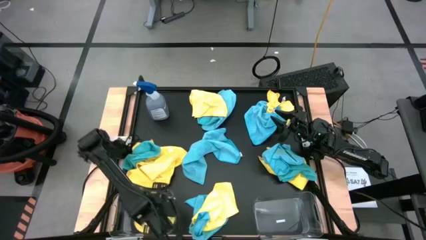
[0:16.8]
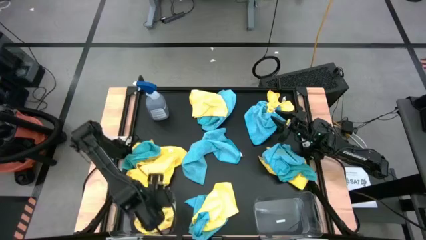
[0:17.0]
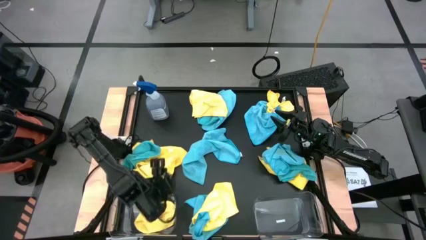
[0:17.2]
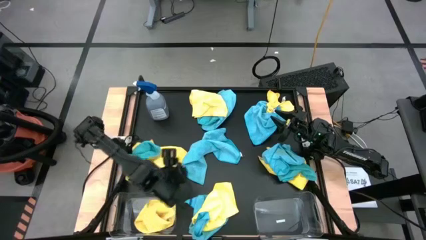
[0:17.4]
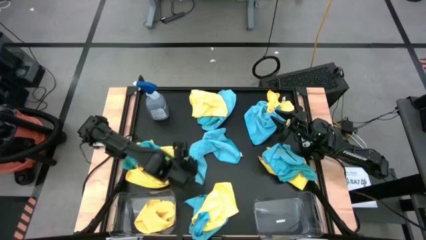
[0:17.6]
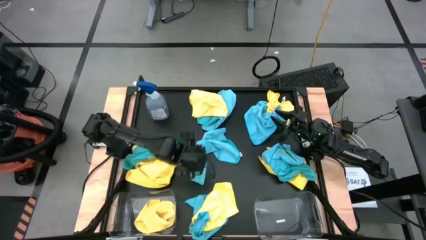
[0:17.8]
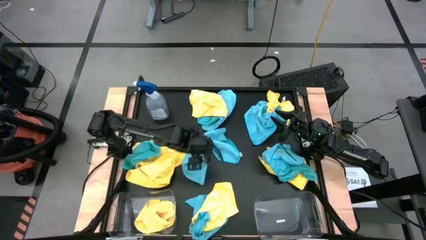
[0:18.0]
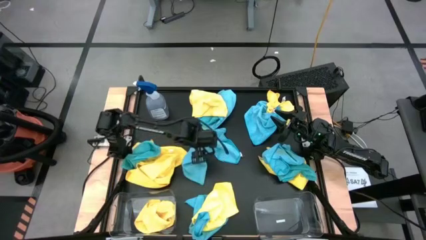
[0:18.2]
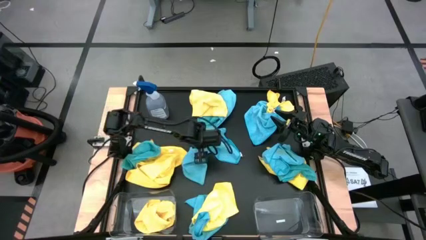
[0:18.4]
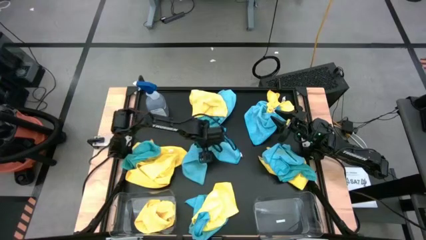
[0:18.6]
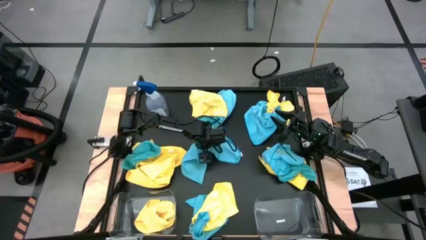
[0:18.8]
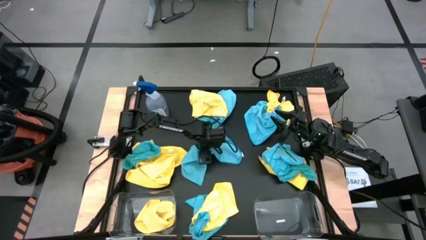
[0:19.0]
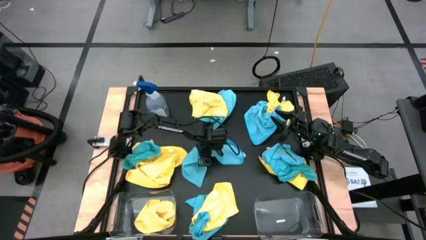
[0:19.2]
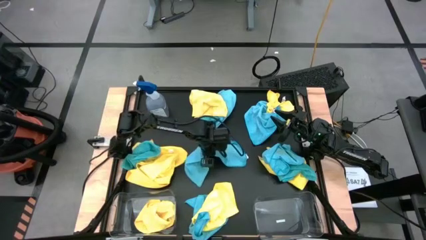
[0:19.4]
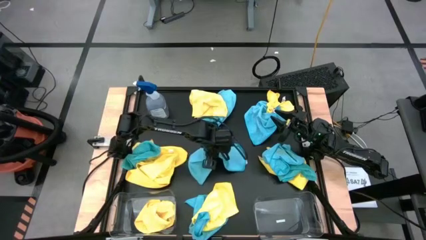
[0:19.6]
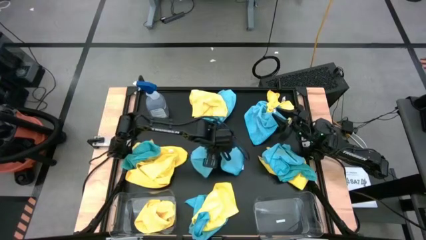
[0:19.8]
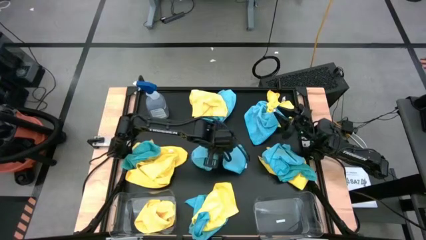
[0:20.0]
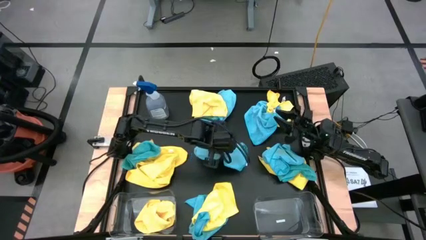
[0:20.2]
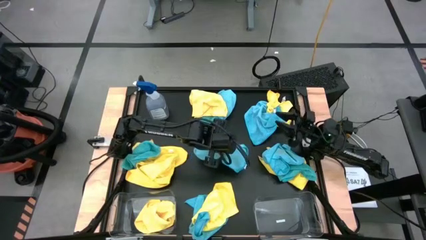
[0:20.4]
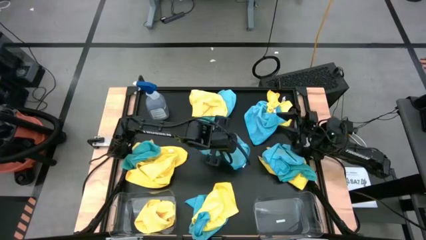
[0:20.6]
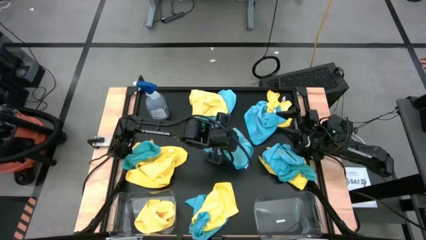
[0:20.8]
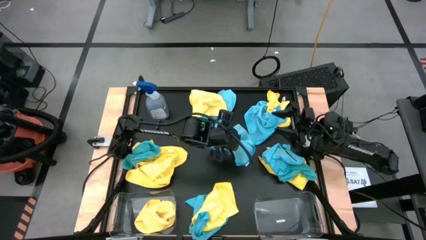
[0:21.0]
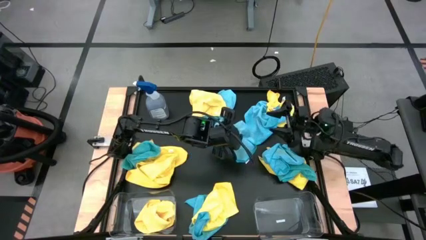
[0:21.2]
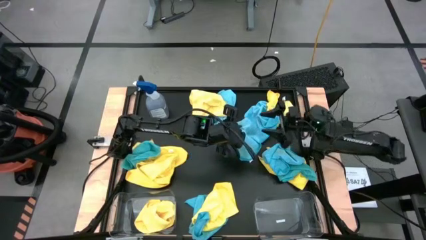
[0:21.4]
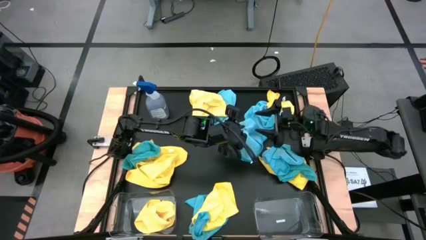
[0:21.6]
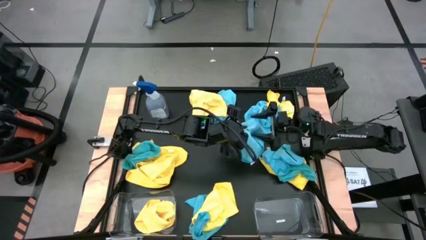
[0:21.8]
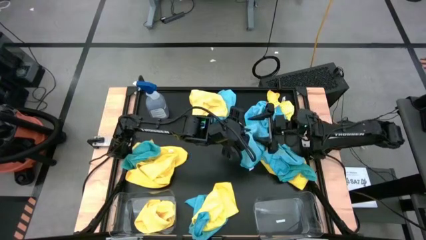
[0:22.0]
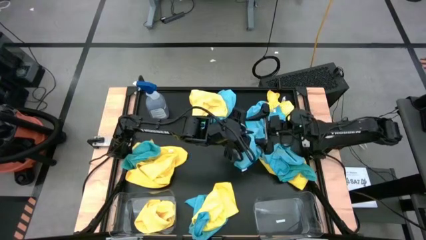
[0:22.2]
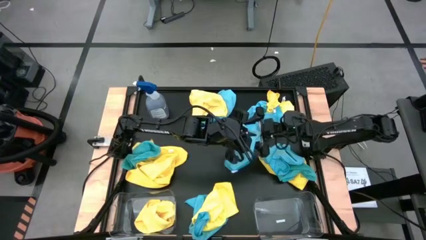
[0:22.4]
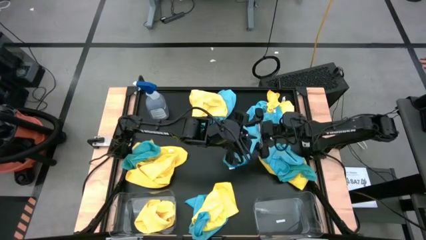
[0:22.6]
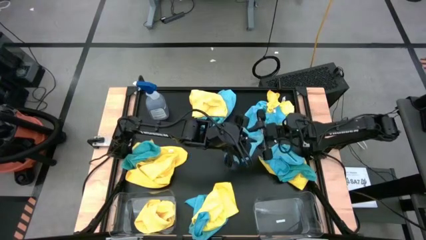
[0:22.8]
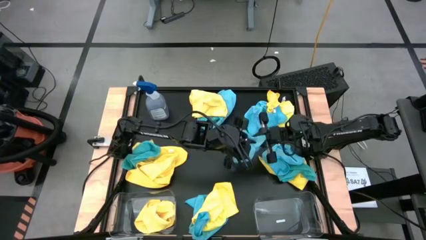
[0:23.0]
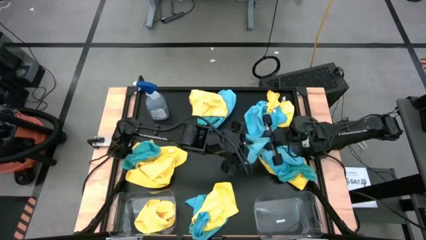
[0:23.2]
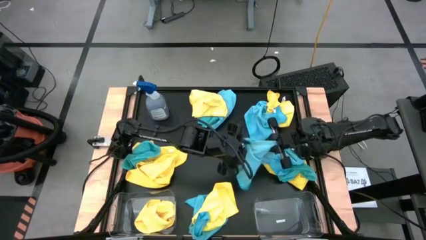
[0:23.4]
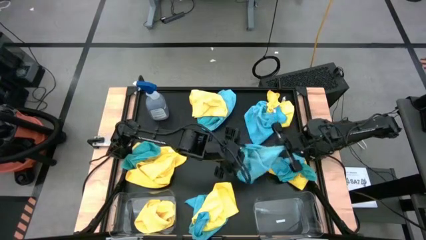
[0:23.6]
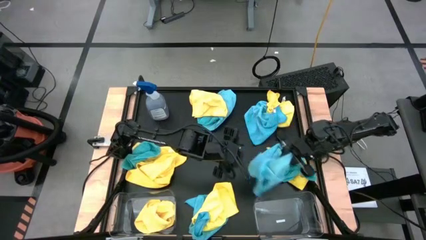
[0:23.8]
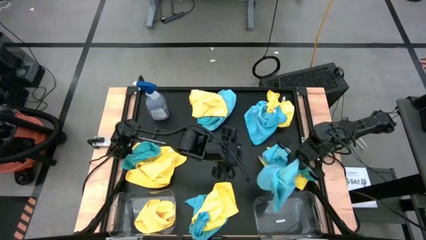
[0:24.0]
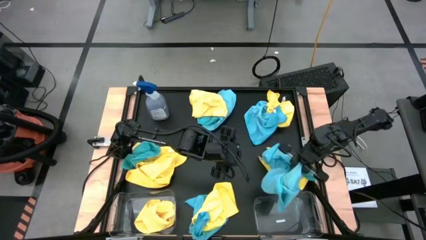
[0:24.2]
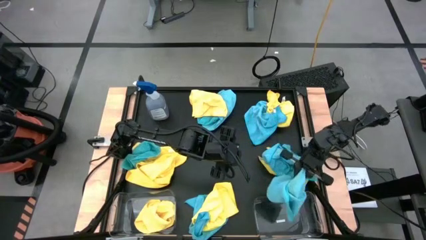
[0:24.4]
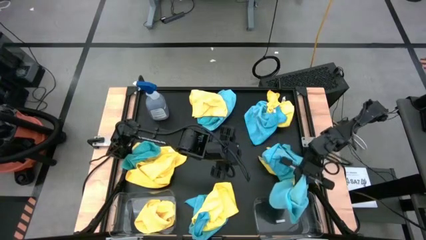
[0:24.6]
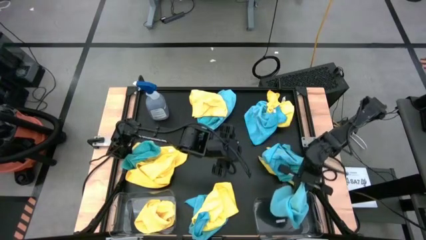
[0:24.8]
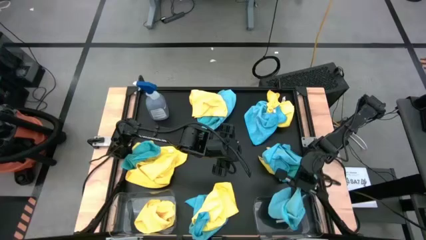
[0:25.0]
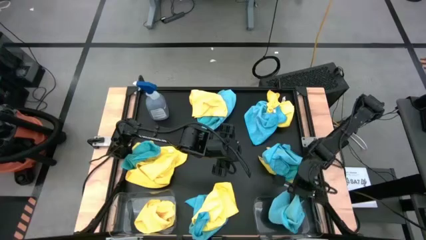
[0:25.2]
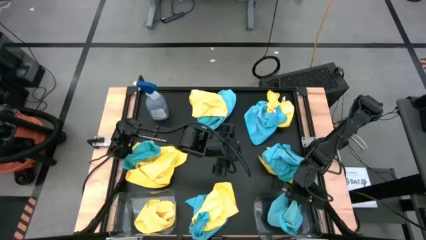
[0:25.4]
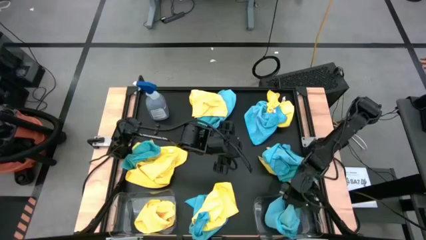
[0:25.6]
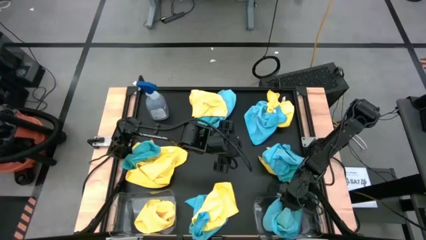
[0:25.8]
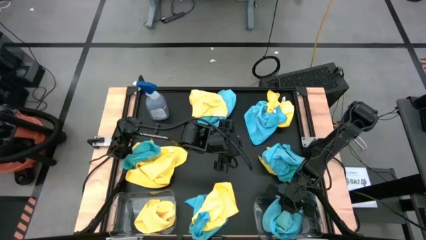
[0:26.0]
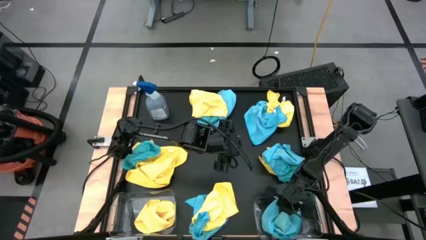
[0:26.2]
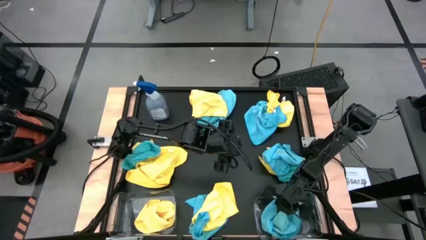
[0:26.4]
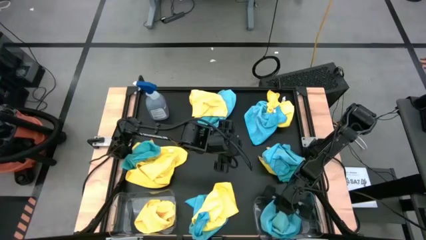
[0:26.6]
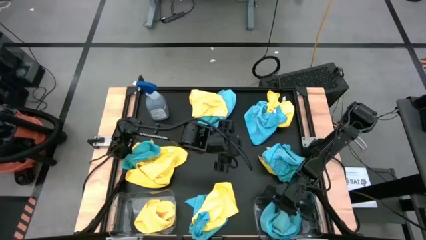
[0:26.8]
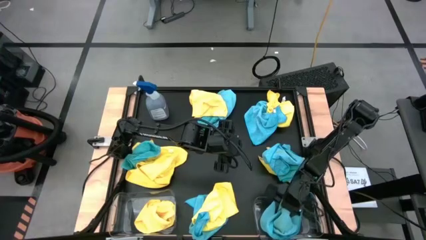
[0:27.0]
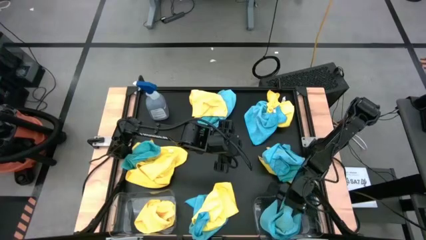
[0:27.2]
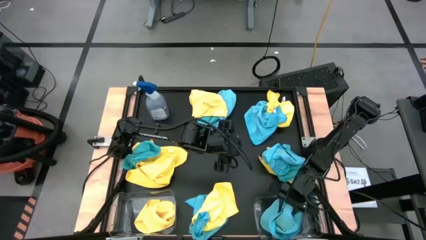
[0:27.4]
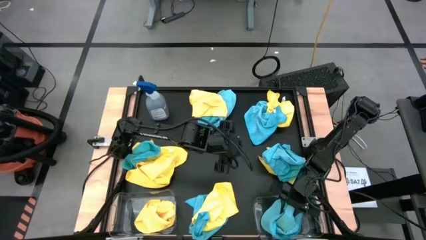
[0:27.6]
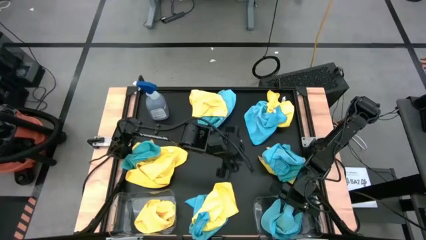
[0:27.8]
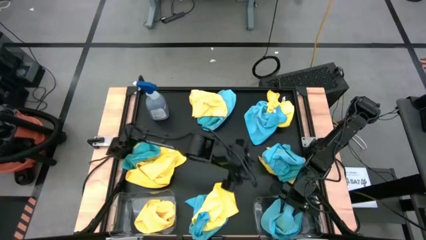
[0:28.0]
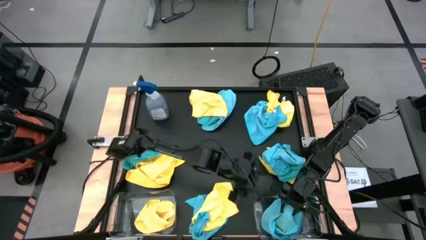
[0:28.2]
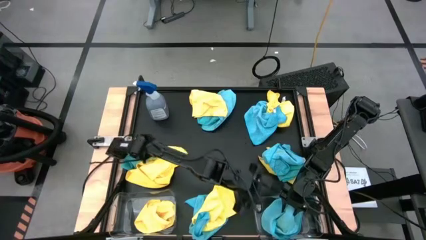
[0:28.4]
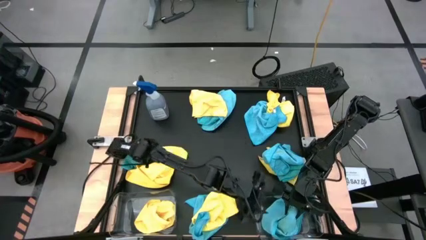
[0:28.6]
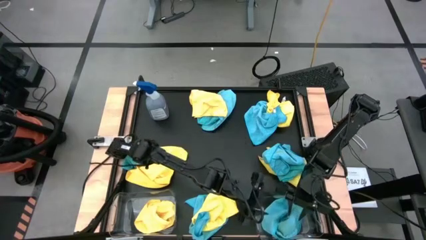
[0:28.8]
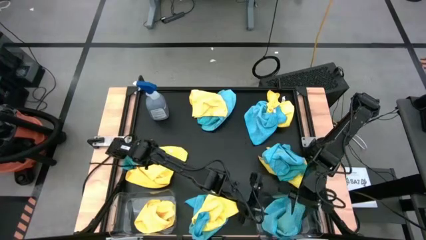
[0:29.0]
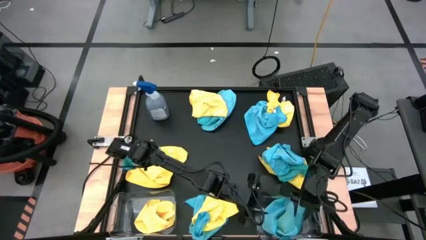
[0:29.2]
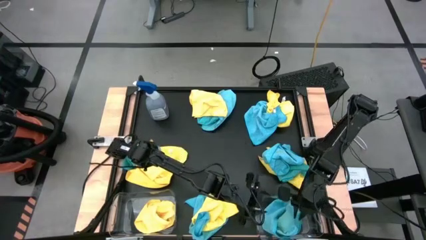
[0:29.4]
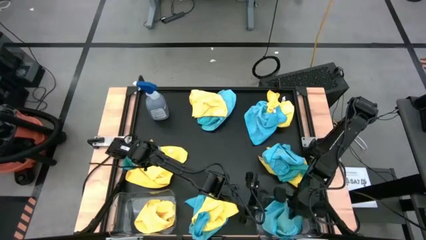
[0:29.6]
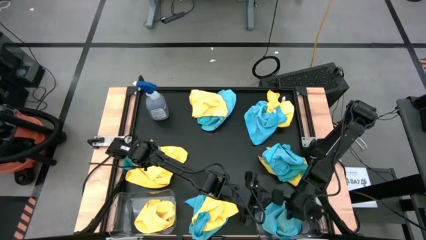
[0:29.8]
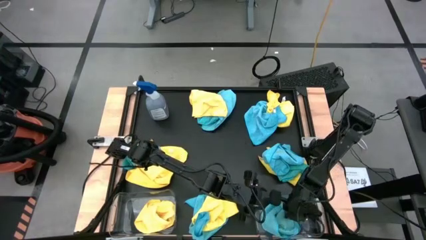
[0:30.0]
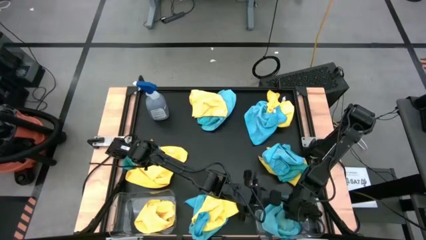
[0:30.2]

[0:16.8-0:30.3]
Task: Sort microfiber towel by color & place in baskets
Put the blue towel into the right transparent bin
